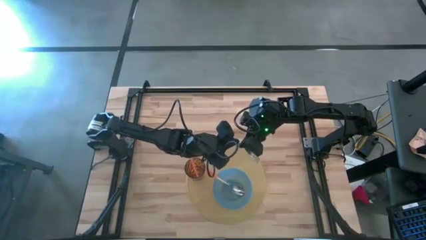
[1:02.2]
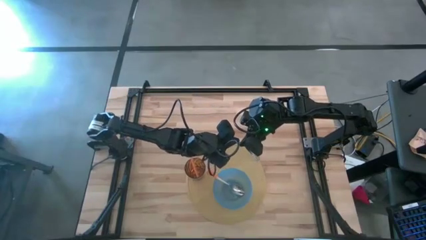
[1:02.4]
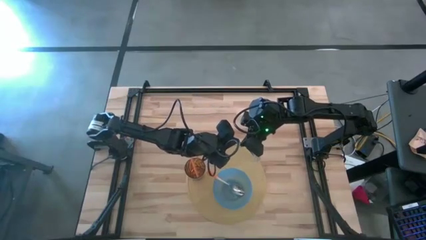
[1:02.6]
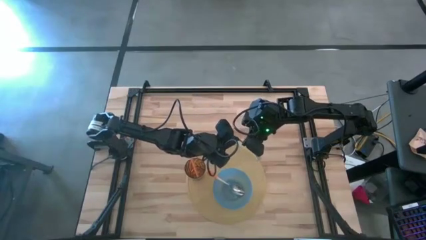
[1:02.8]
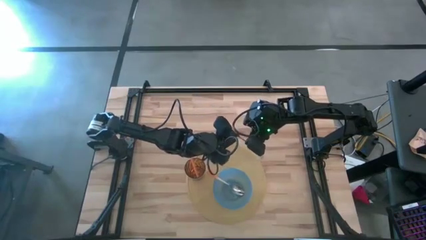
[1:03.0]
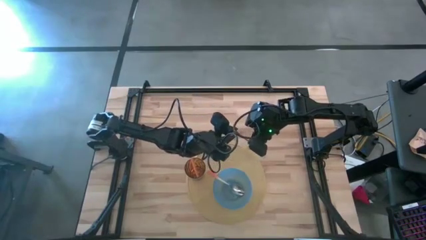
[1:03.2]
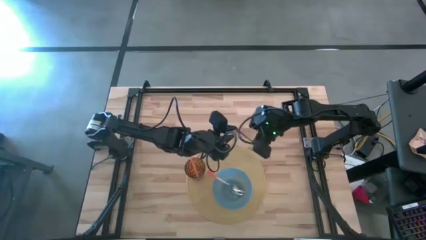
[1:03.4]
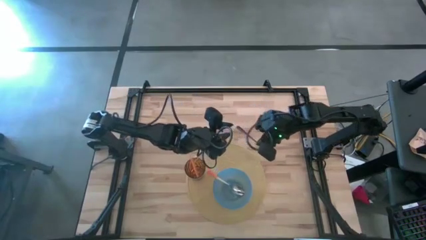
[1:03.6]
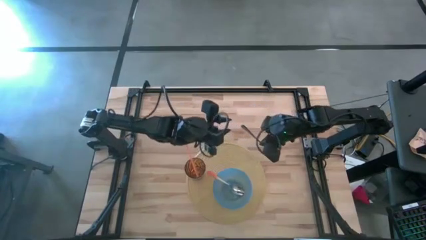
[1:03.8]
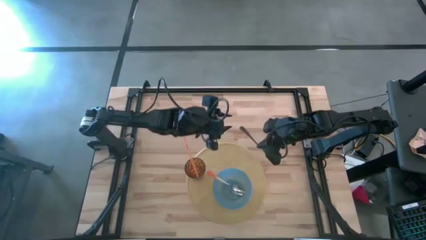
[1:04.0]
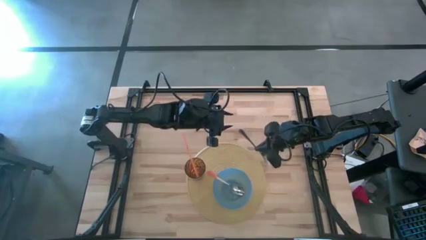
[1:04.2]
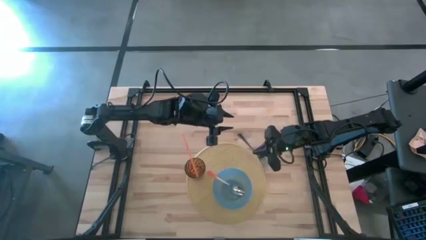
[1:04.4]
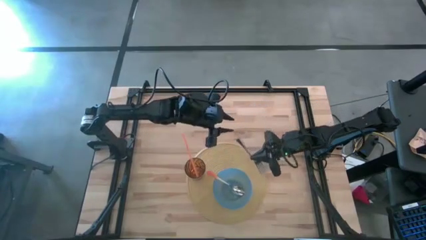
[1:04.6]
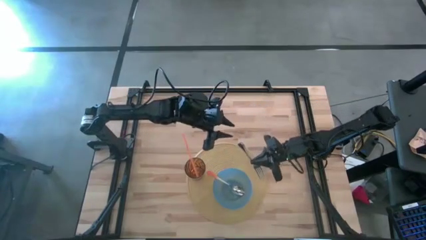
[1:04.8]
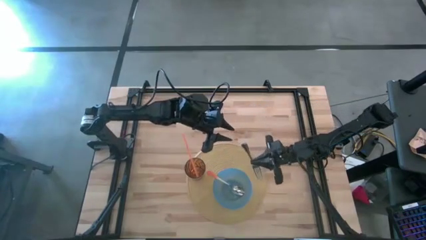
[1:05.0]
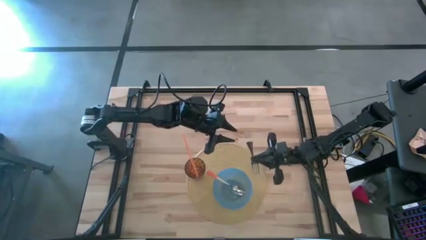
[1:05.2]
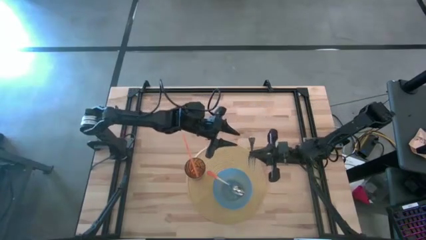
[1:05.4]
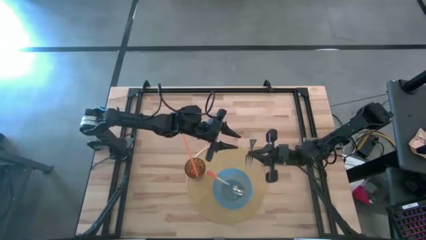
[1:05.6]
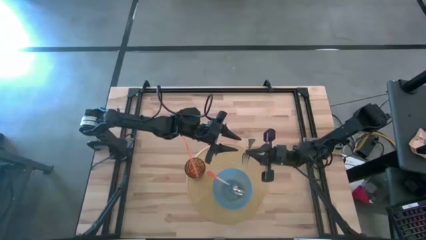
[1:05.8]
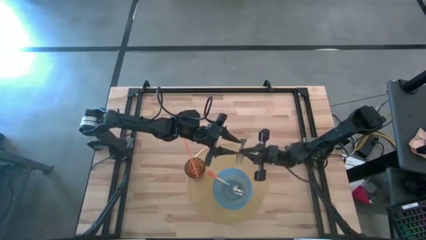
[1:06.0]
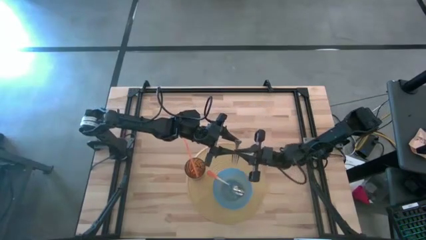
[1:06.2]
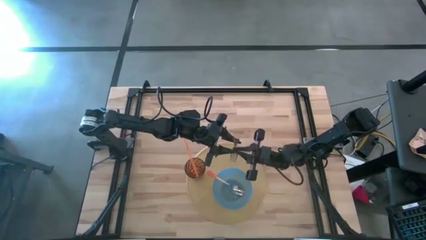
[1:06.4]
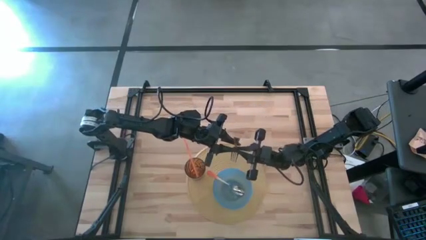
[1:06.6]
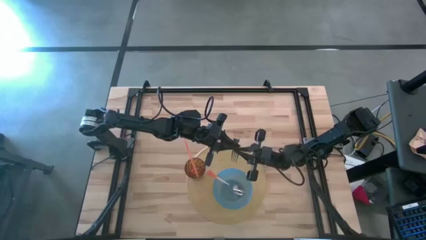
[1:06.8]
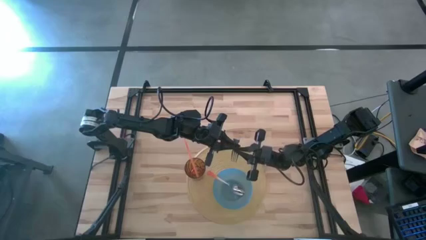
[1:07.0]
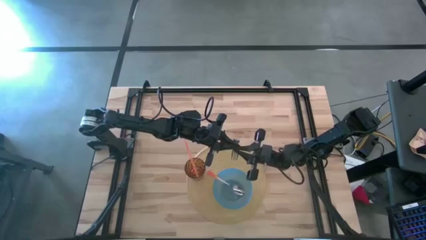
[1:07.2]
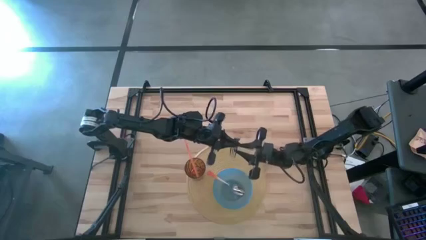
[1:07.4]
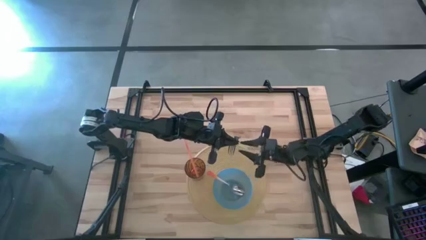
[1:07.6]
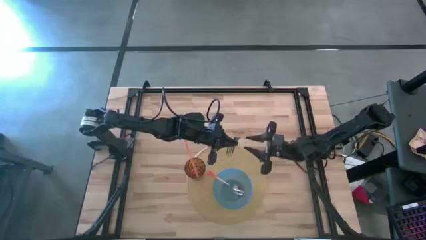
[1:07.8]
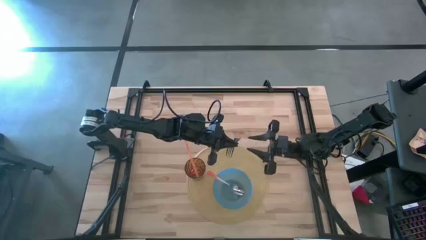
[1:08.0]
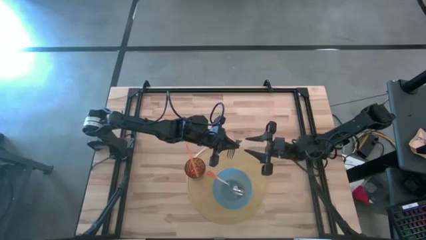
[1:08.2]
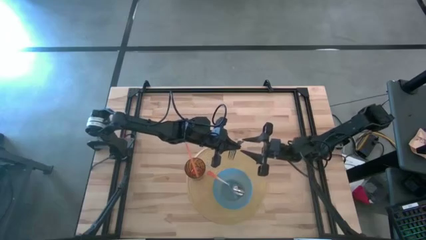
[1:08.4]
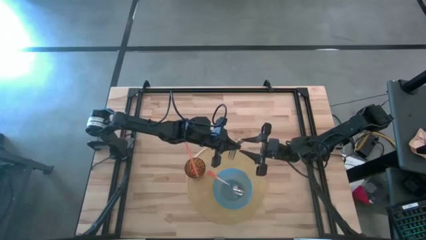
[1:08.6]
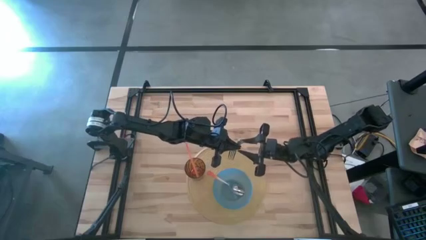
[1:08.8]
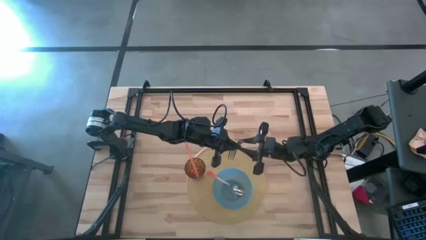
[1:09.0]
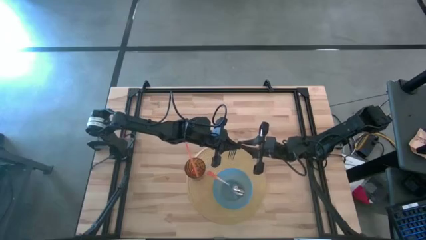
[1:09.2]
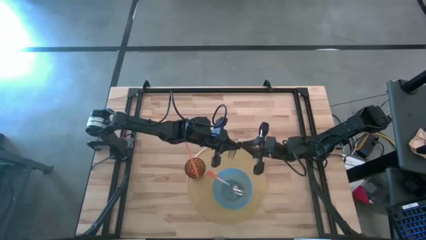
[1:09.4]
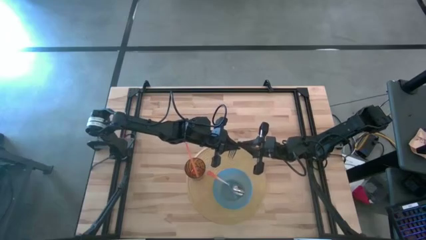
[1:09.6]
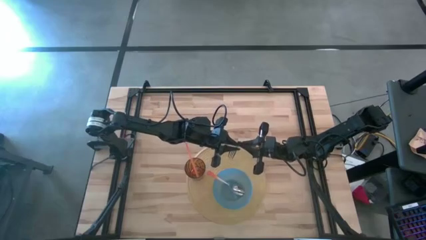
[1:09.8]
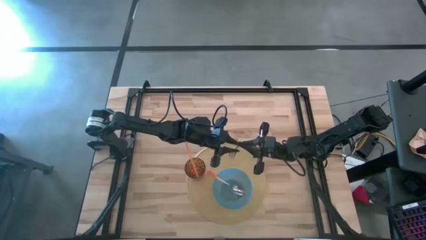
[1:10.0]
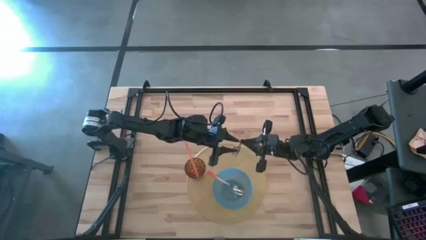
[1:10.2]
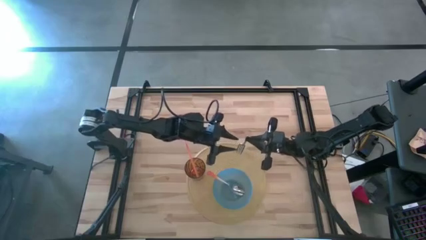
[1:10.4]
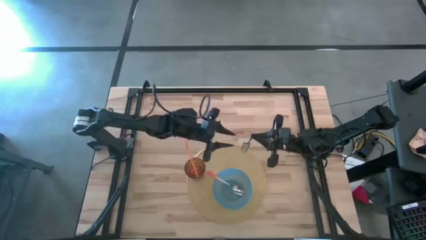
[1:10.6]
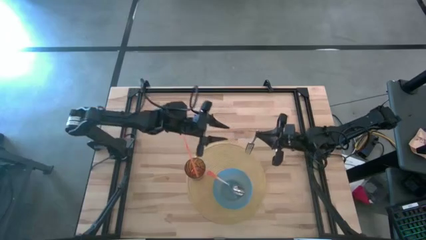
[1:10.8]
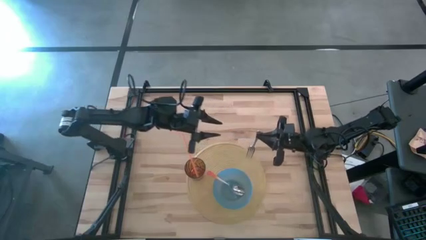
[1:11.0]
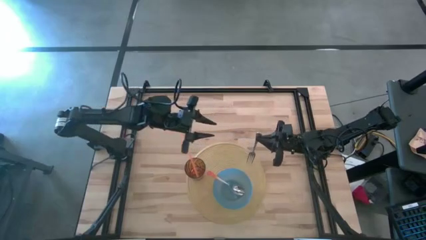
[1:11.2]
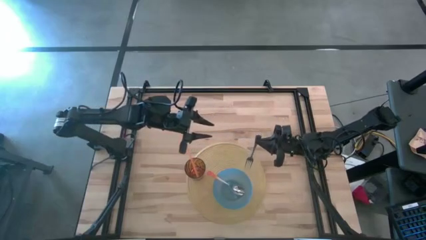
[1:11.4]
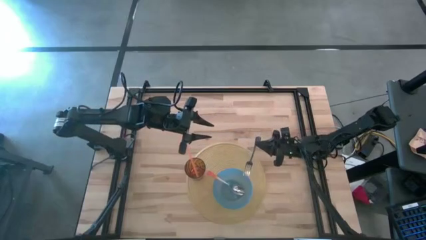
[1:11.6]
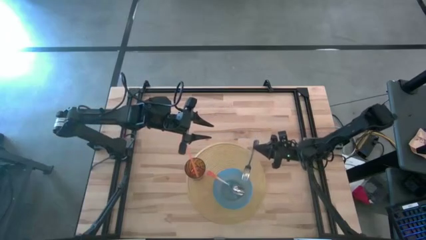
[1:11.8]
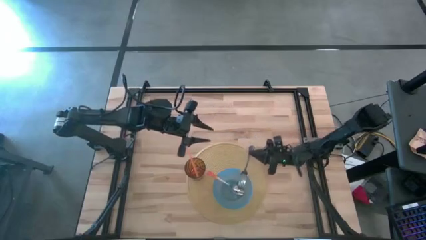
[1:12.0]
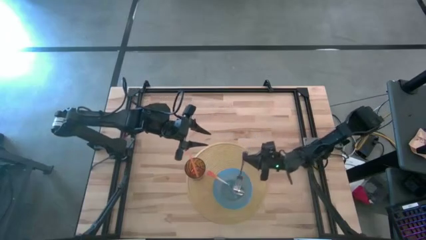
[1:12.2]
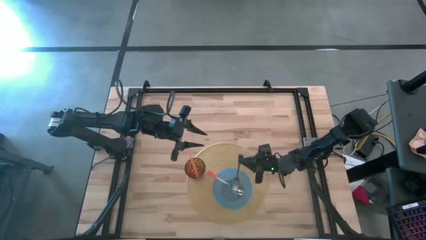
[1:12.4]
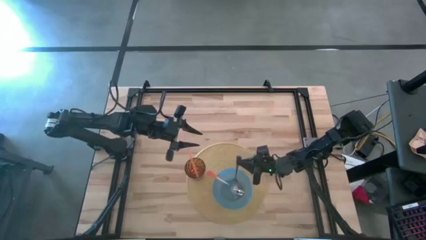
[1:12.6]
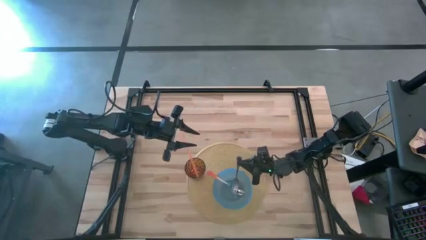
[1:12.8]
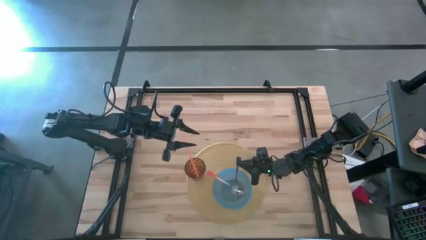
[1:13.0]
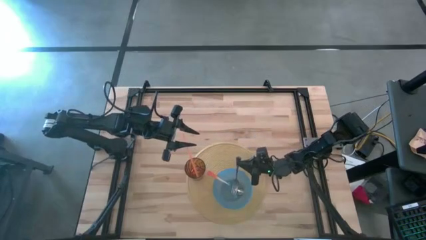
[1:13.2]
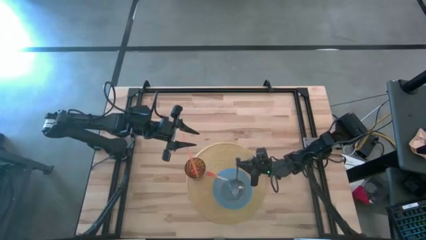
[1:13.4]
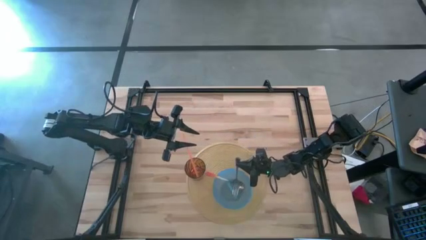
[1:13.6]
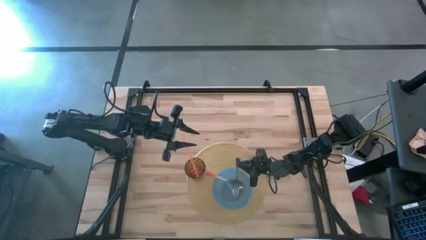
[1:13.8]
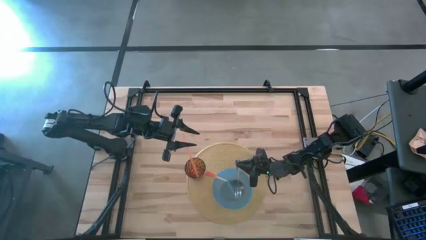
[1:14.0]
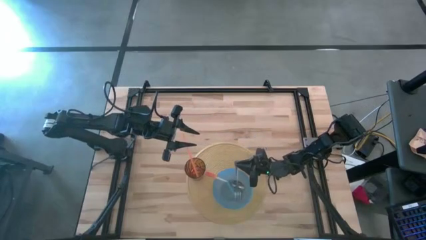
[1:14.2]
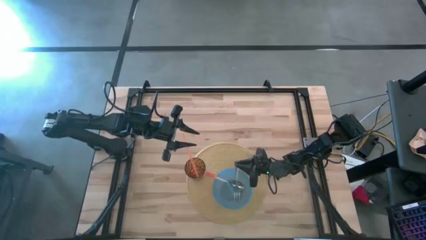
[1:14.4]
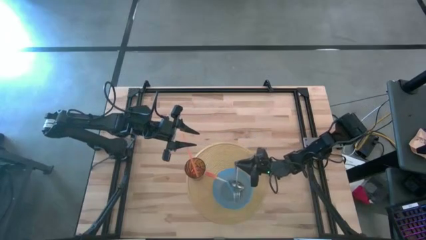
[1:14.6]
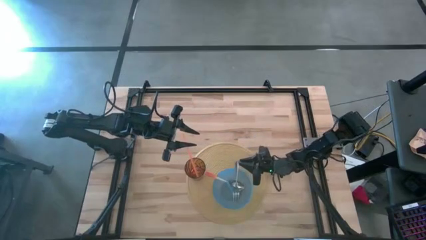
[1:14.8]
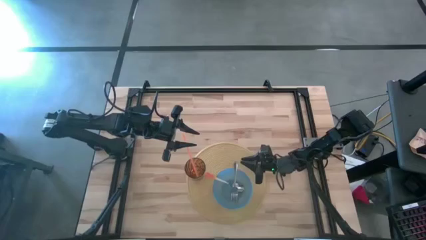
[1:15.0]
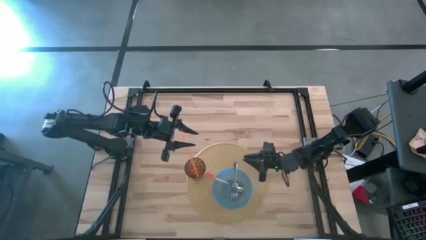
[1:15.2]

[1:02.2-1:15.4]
Task: Pick & Place Utensil
Put the silver fork to the right of the orange spoon in the blue bowl on the brown mat
